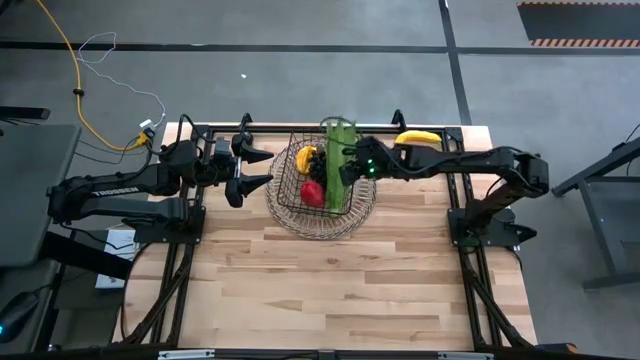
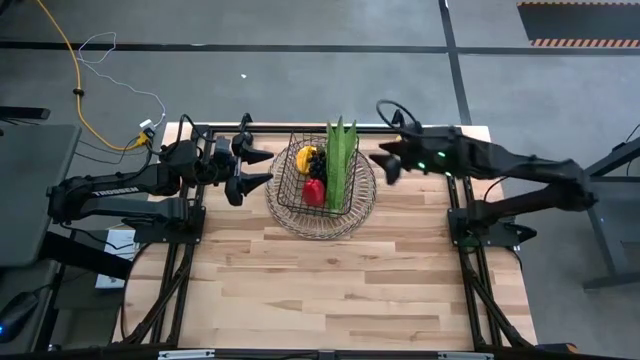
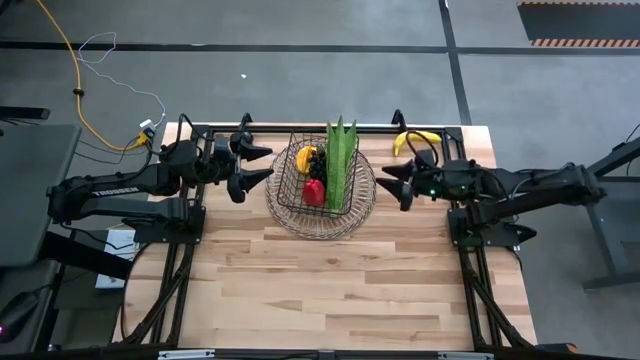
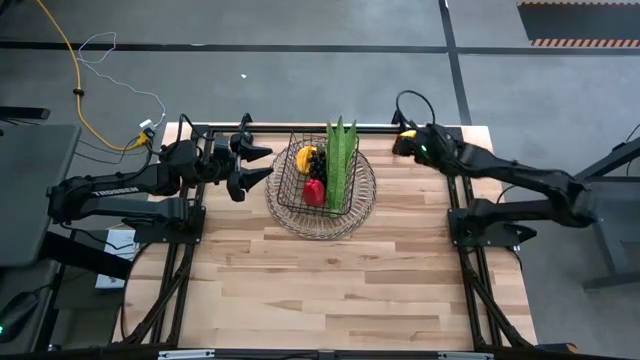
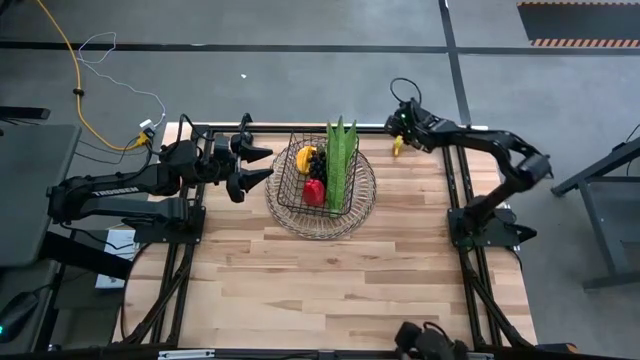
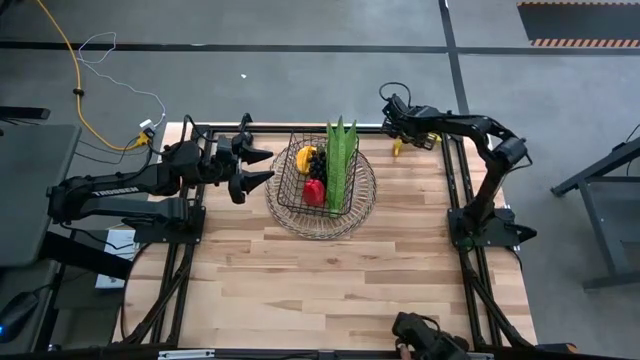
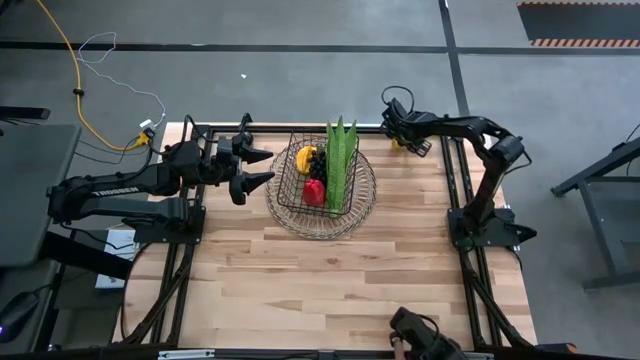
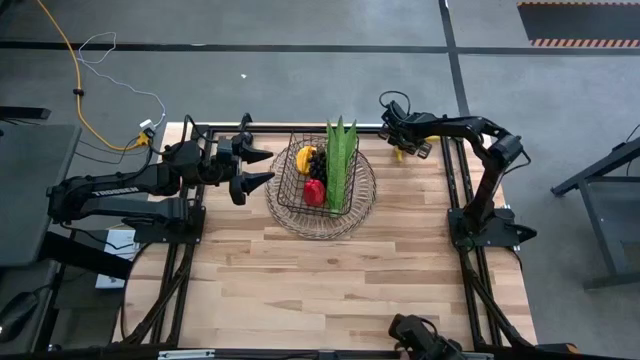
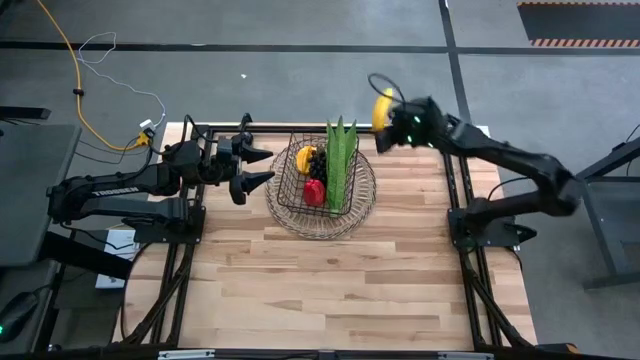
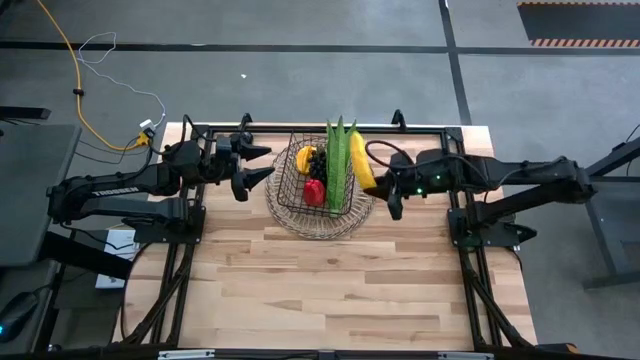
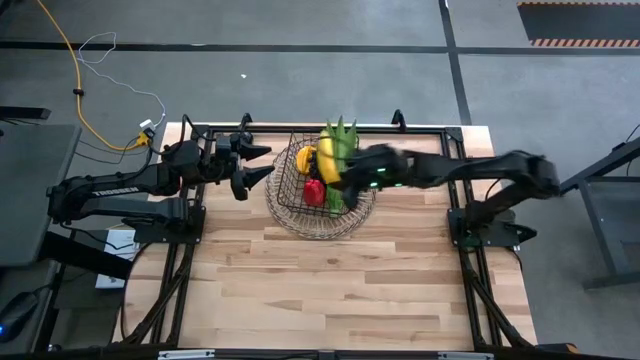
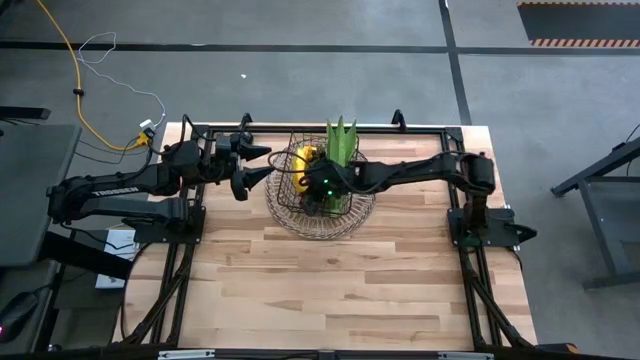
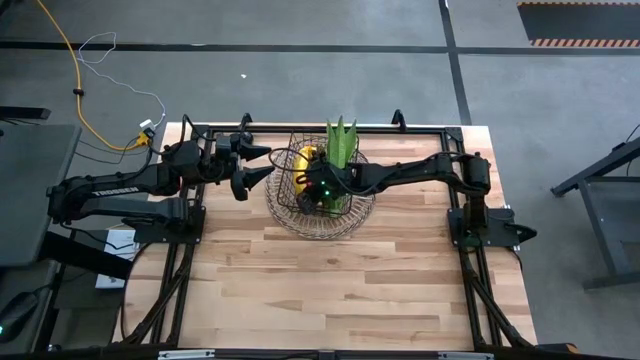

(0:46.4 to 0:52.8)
Task: Build produce basket
Put the banana into the metal wire basket

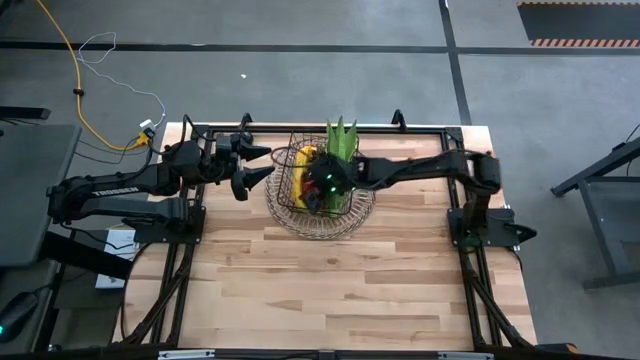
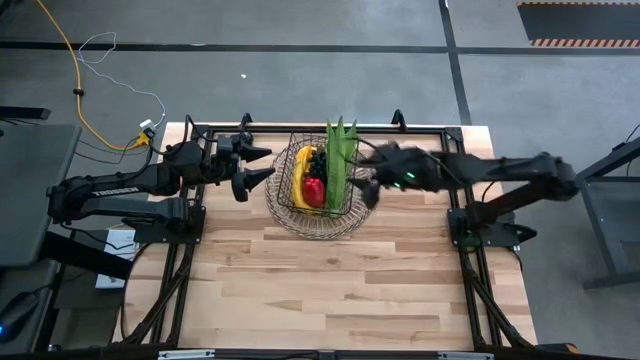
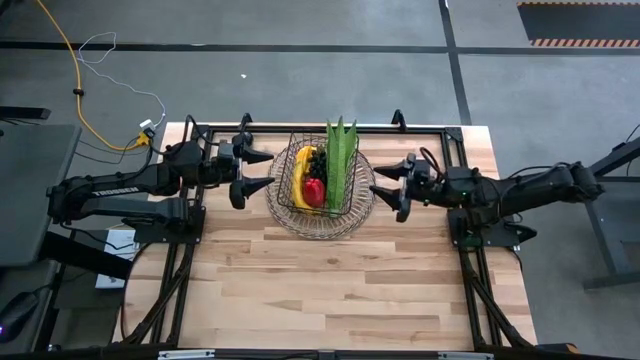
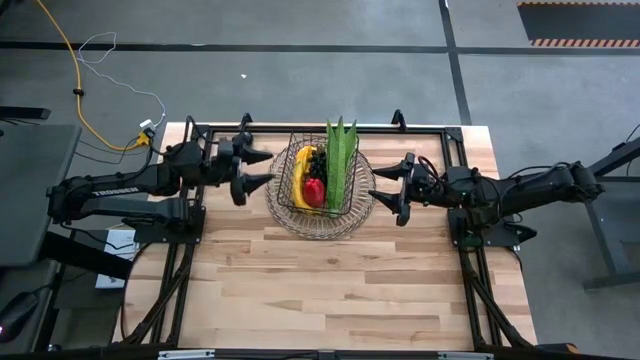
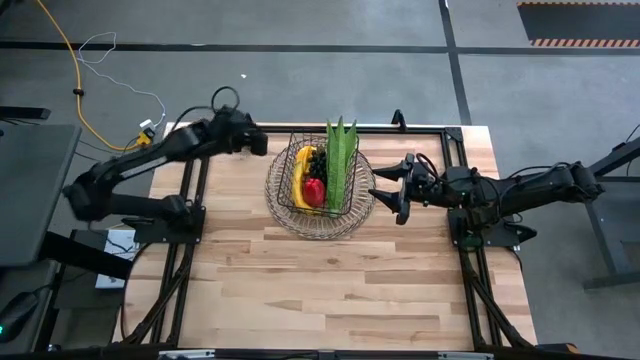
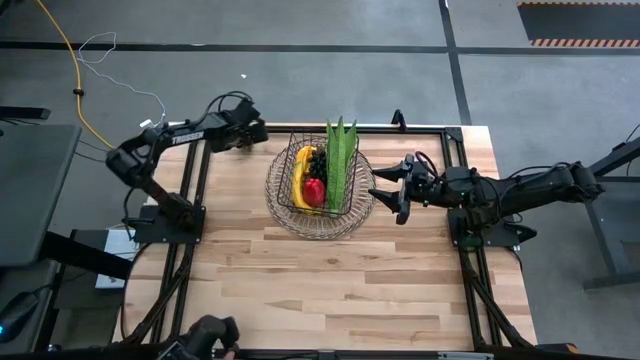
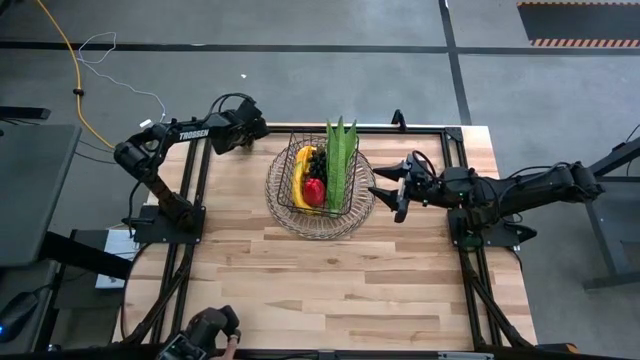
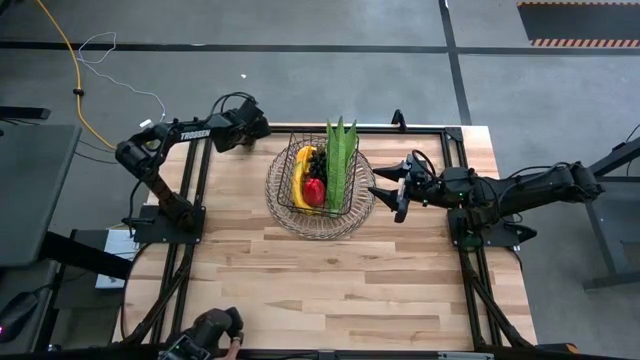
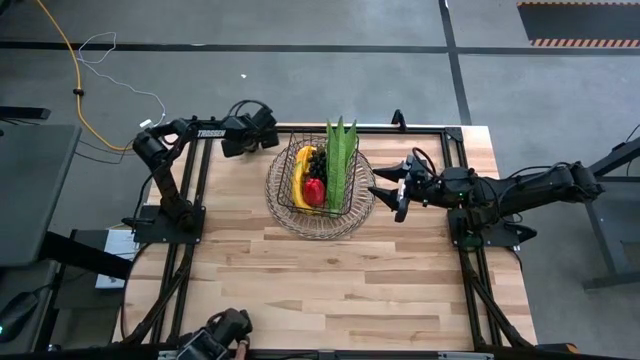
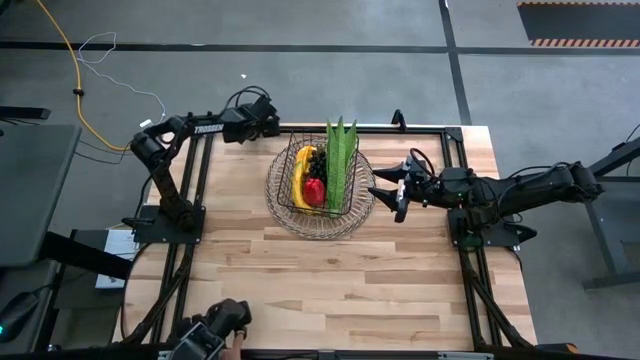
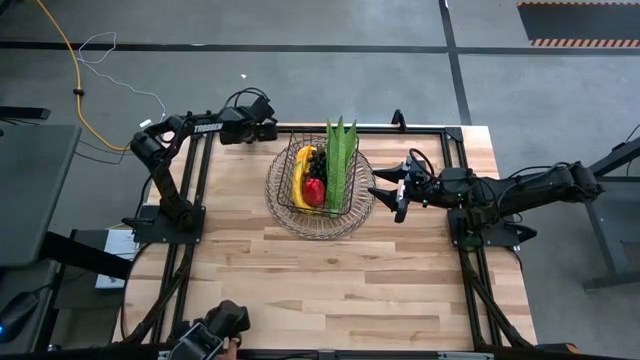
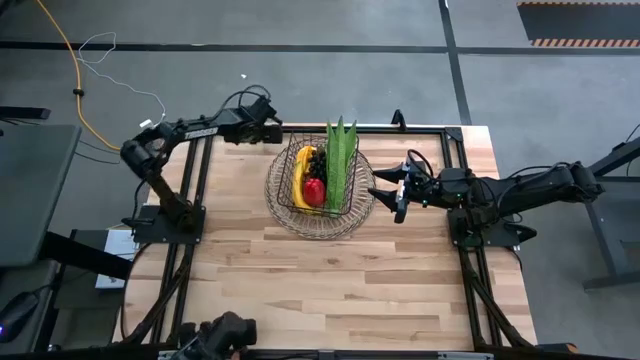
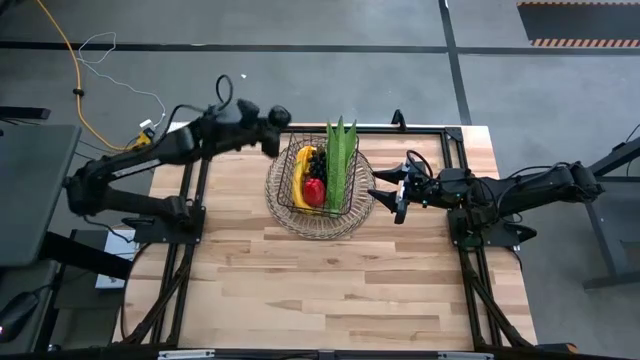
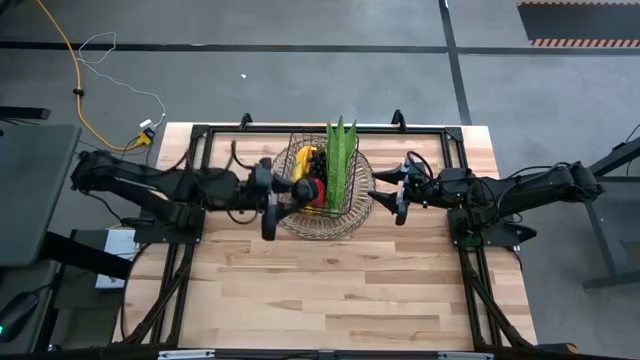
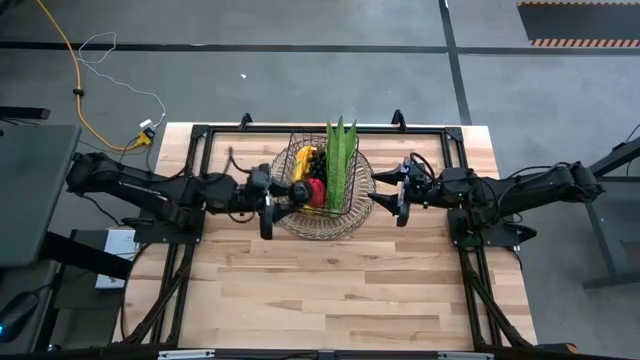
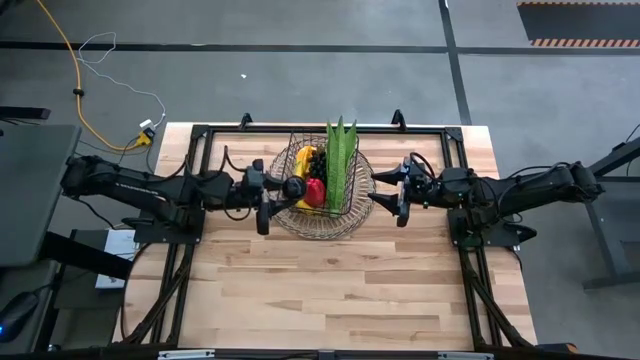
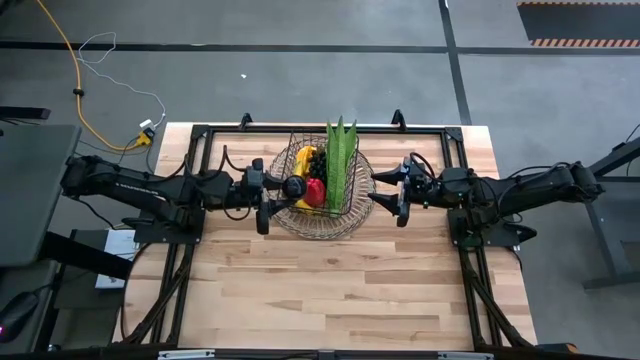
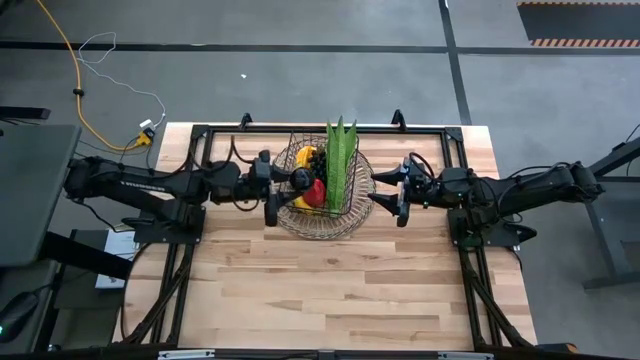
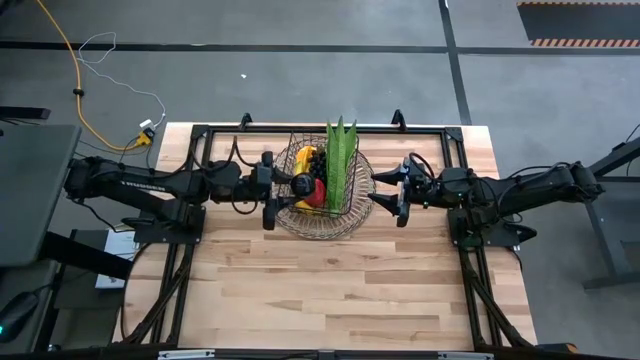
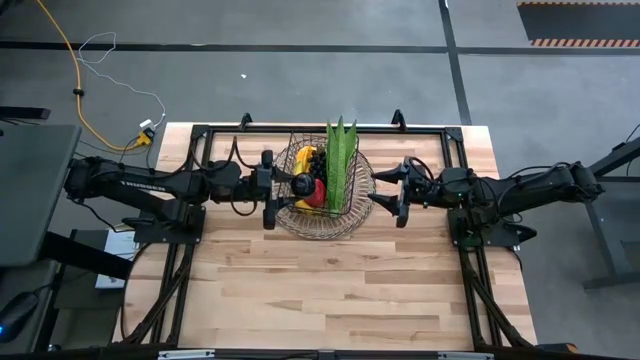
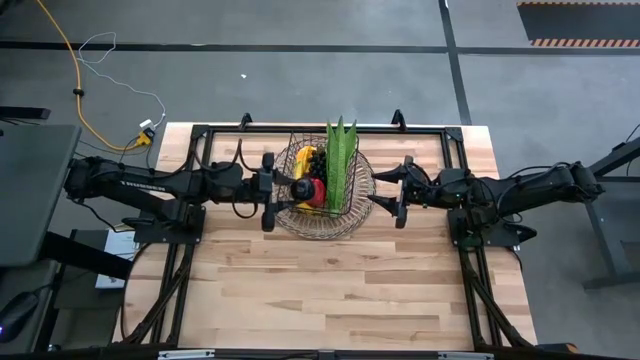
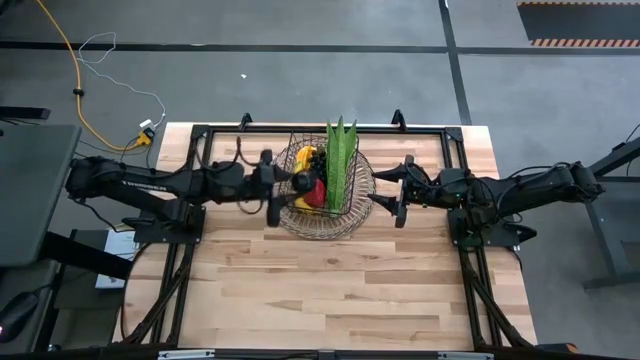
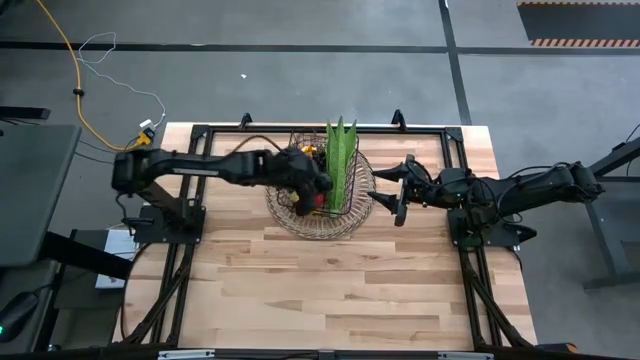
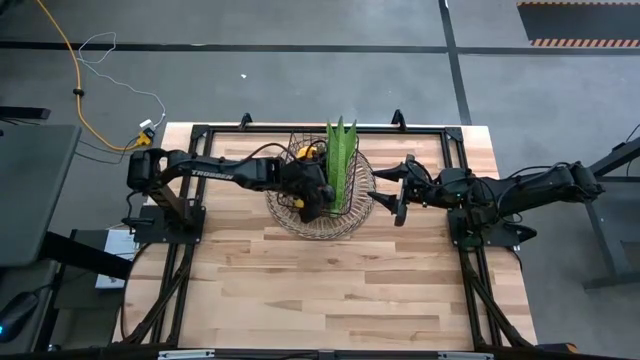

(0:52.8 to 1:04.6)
Put the mangosteen into the wire basket

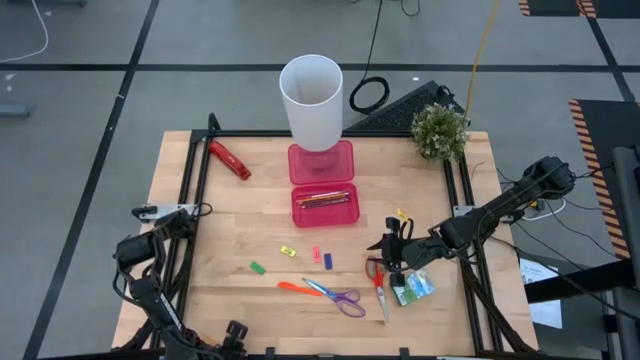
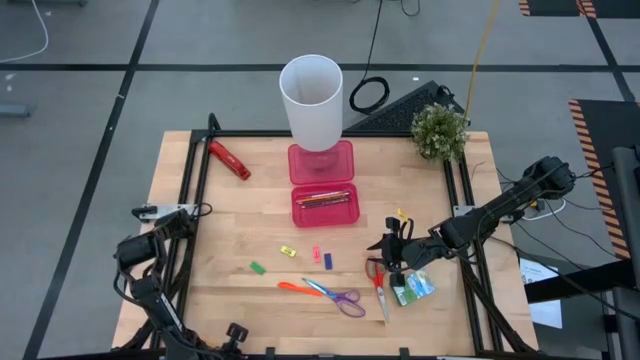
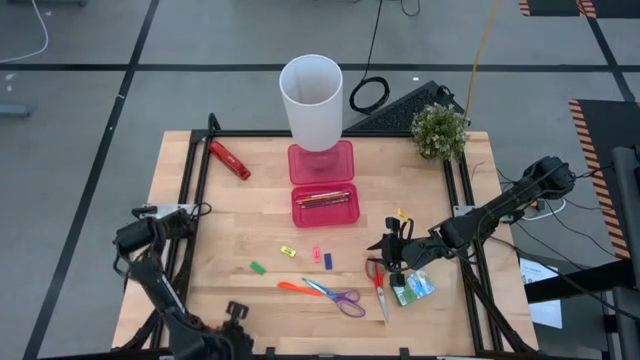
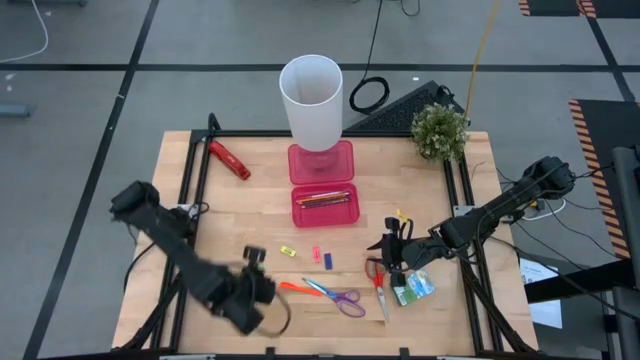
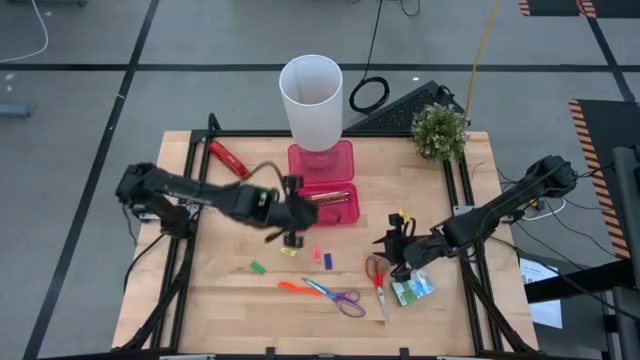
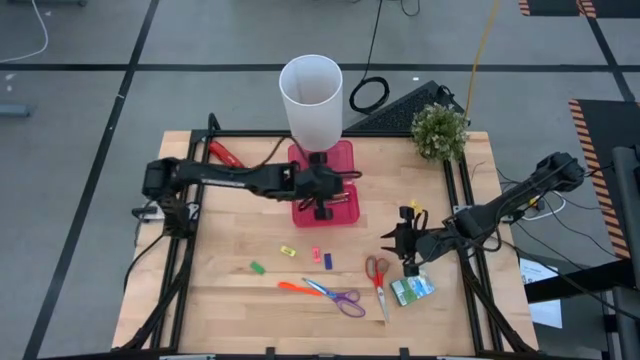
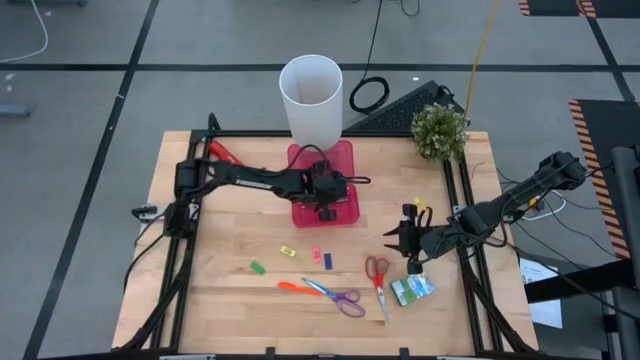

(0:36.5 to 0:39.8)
Task: Pack school essentials
Put the yellow pencil into the pencil supply box
